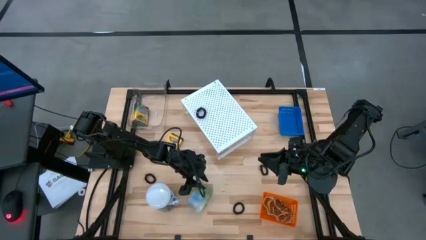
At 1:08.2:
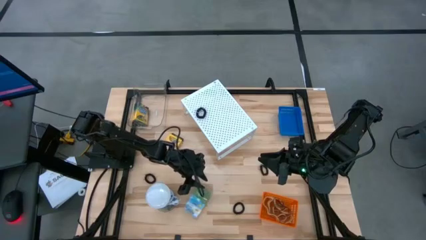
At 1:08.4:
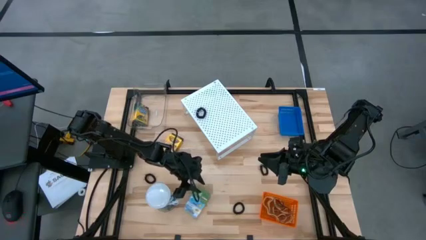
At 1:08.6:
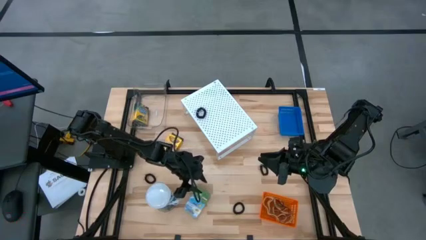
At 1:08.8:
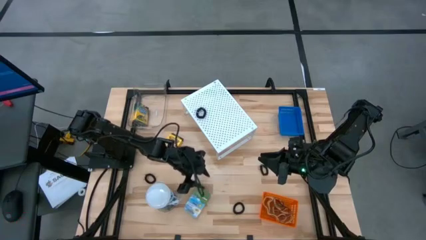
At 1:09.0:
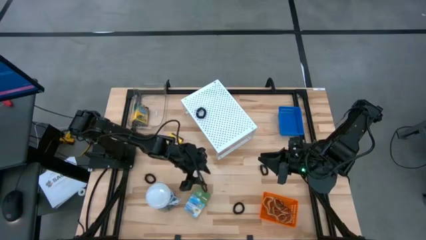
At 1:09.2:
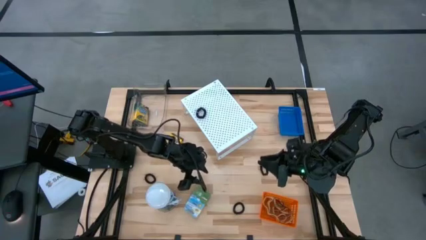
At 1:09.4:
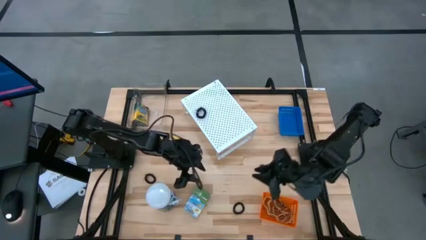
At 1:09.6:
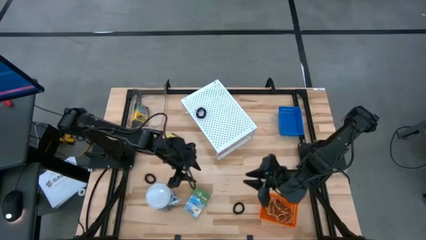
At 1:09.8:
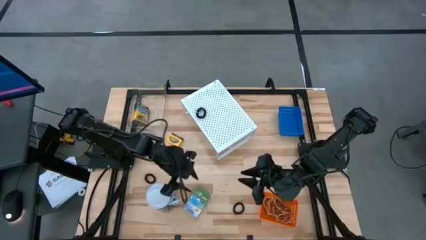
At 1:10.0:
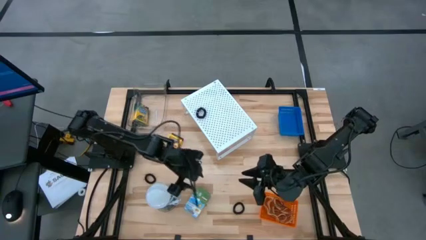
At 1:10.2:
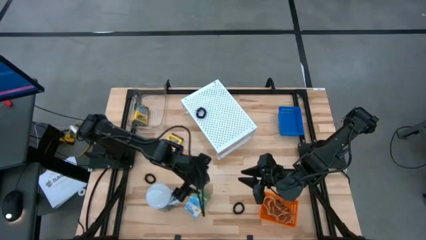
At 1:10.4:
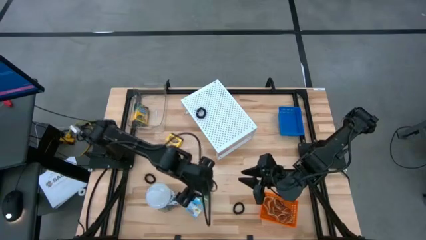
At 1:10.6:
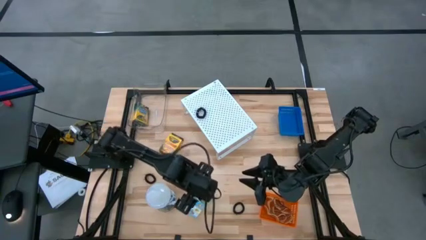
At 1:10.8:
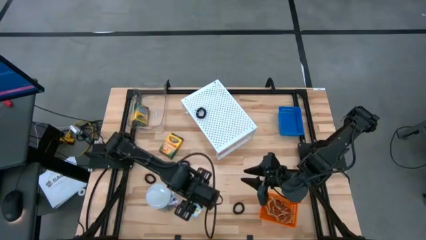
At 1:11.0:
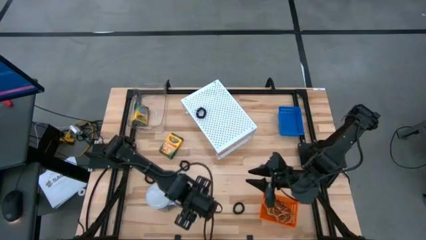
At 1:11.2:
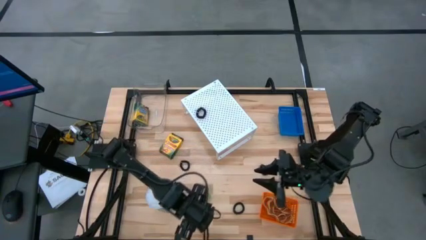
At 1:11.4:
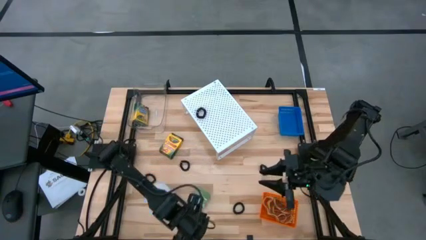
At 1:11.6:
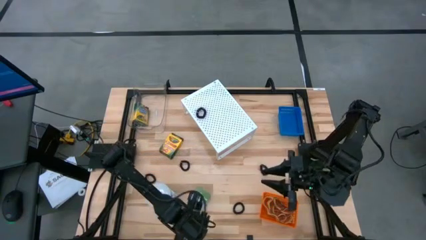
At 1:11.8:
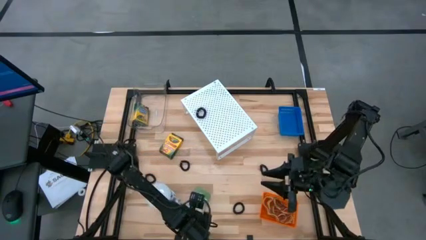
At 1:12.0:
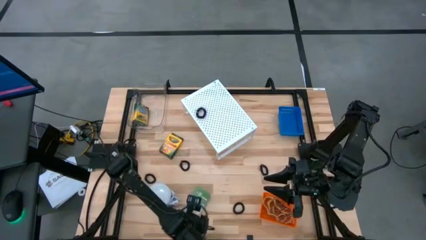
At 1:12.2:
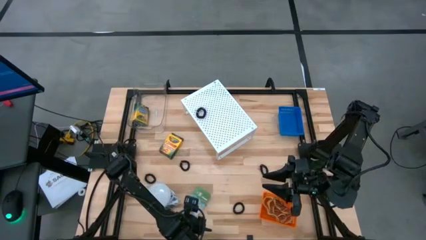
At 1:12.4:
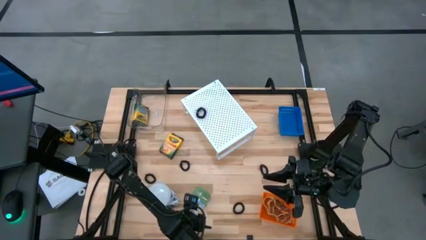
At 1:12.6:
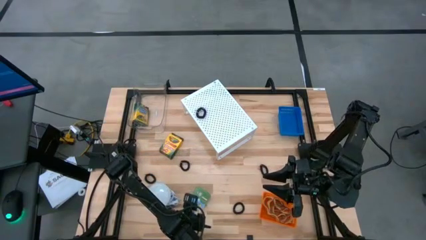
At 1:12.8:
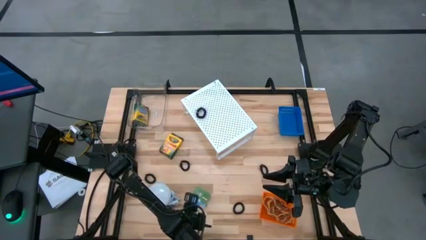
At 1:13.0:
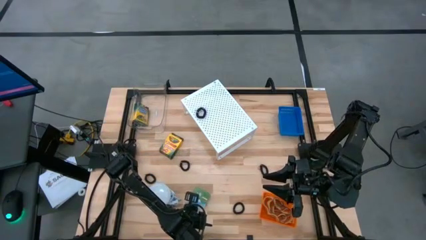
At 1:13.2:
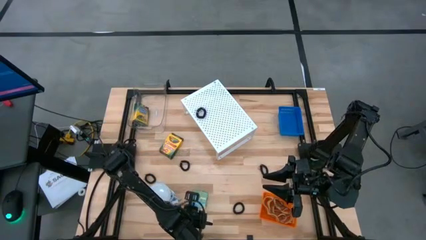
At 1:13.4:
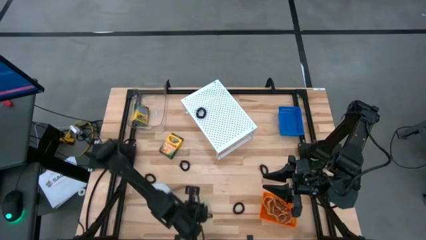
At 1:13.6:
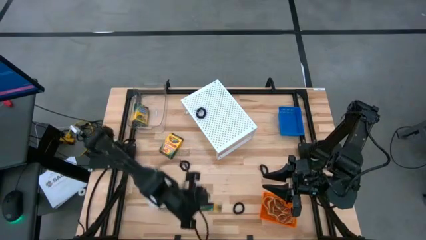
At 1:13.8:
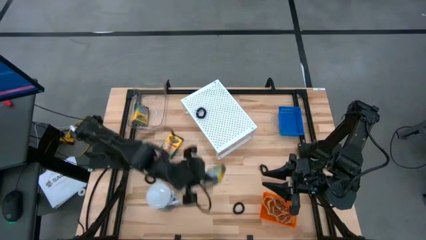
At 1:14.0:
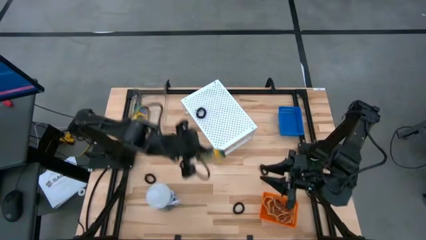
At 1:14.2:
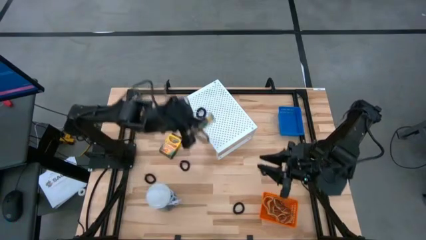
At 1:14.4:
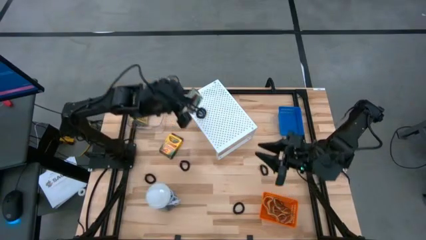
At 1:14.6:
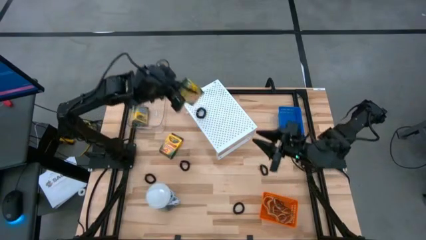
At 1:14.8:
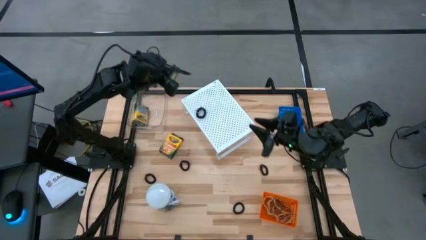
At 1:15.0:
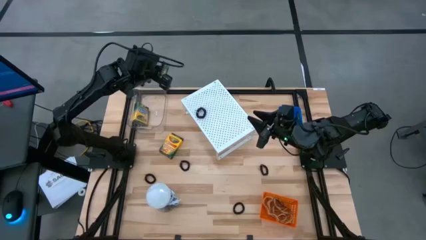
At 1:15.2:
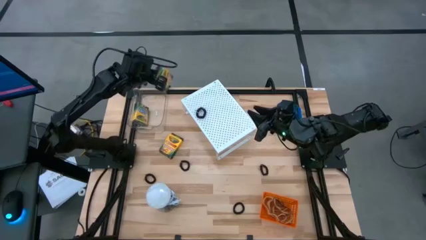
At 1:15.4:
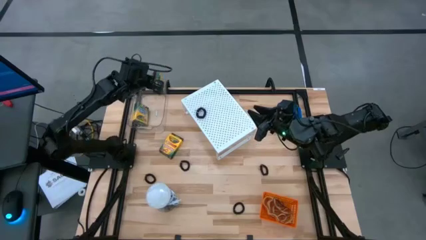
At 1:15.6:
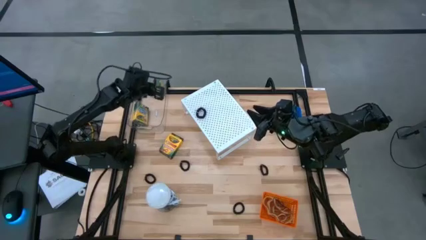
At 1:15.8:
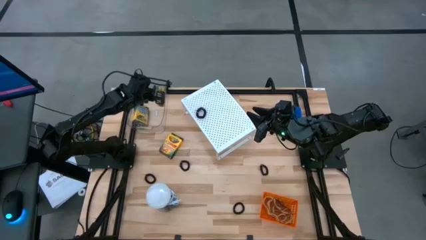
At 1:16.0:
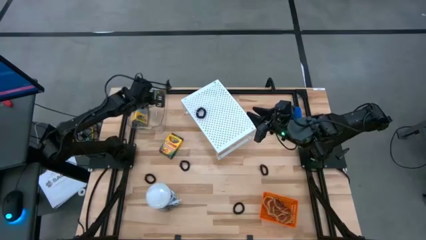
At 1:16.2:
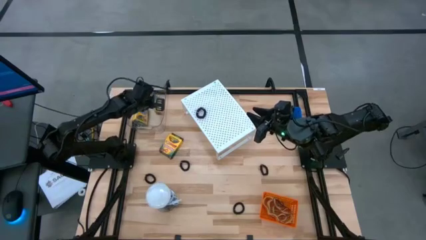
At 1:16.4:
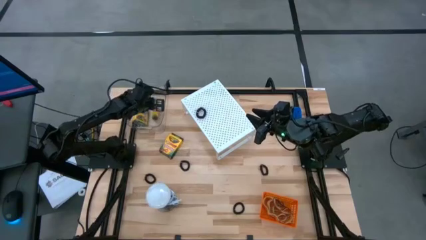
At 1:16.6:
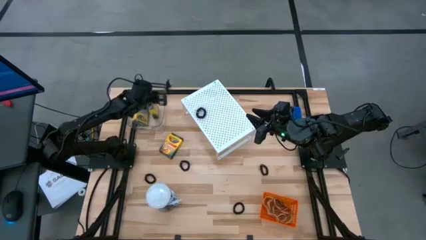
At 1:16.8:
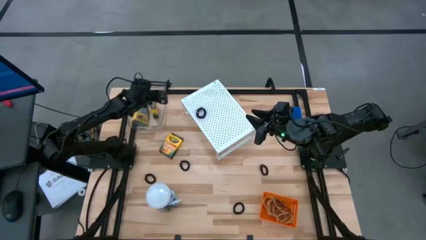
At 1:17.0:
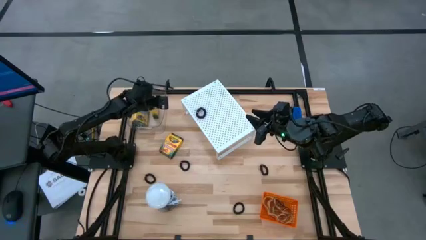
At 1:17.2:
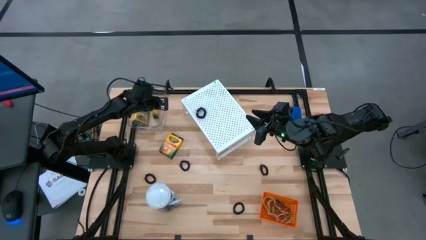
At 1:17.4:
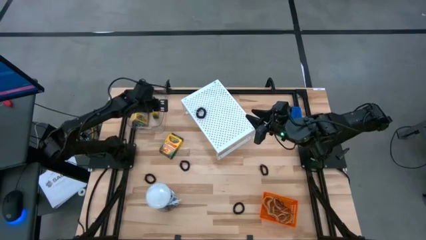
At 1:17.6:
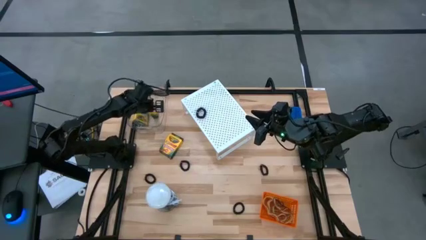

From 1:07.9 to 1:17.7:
Task: Pick & Place Office Desk Supplies
Put the crayon box into the transparent bin
